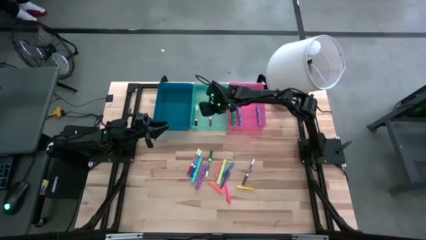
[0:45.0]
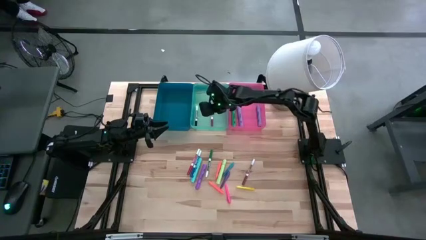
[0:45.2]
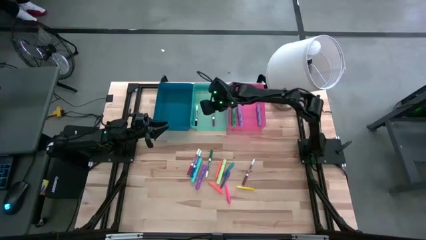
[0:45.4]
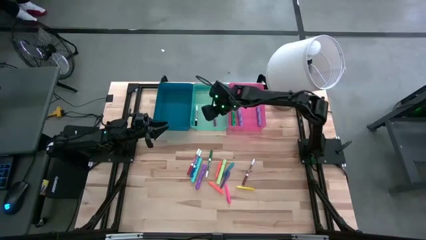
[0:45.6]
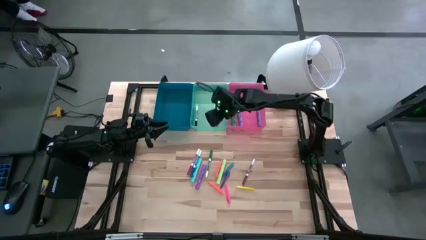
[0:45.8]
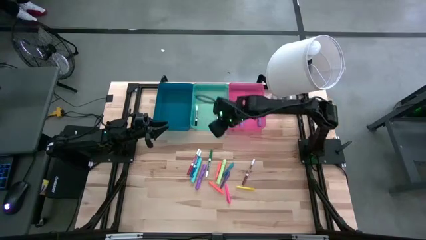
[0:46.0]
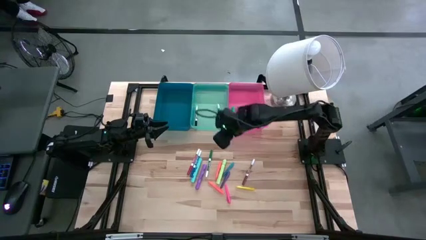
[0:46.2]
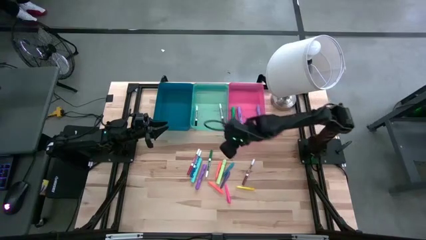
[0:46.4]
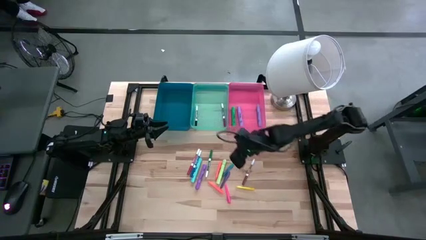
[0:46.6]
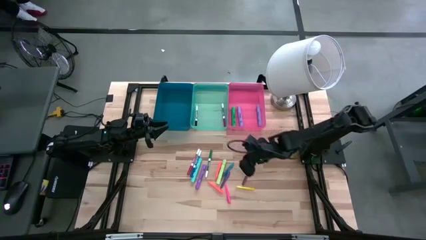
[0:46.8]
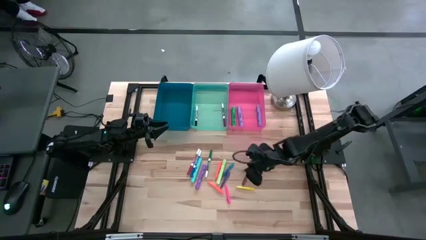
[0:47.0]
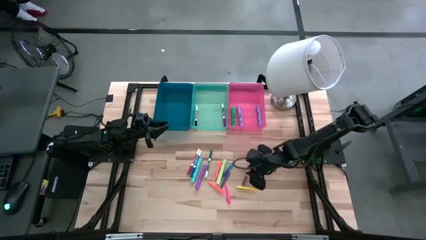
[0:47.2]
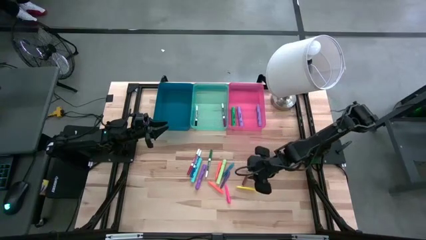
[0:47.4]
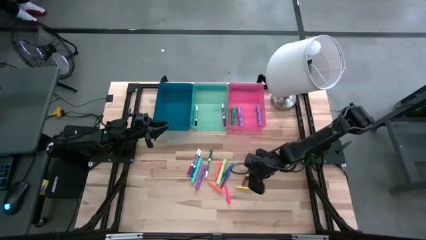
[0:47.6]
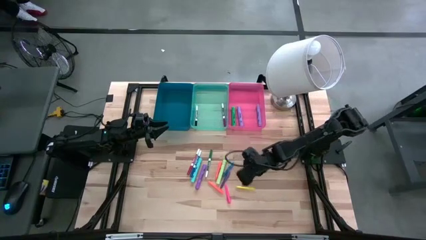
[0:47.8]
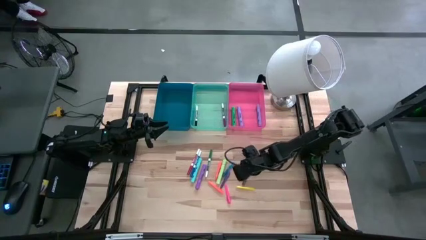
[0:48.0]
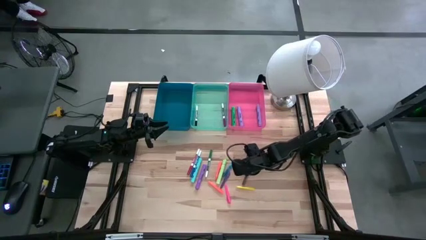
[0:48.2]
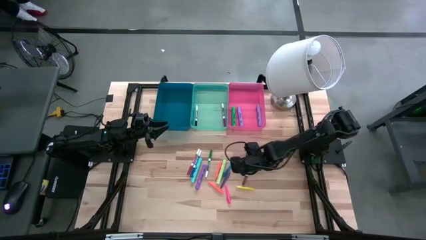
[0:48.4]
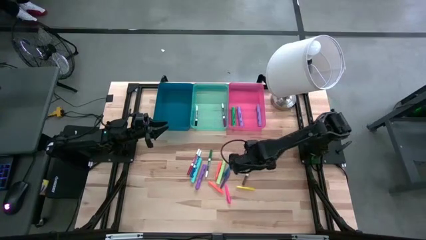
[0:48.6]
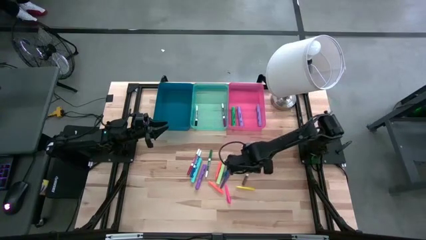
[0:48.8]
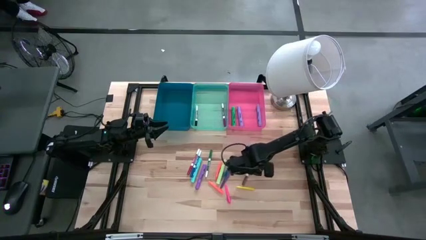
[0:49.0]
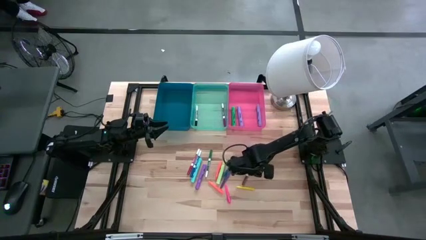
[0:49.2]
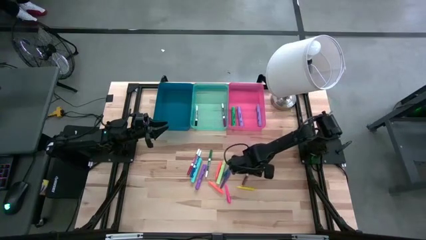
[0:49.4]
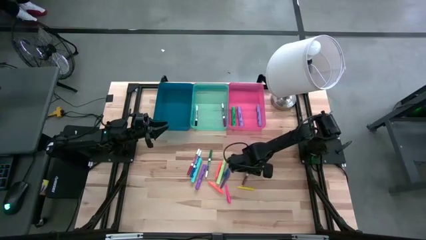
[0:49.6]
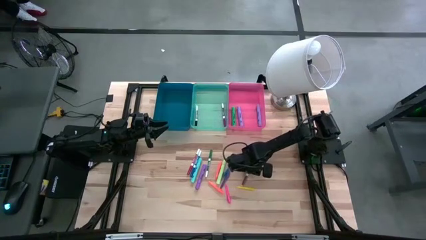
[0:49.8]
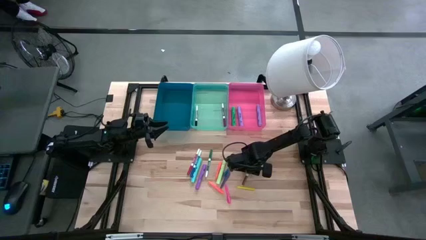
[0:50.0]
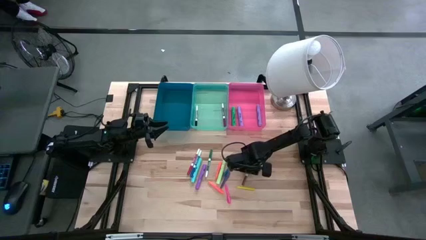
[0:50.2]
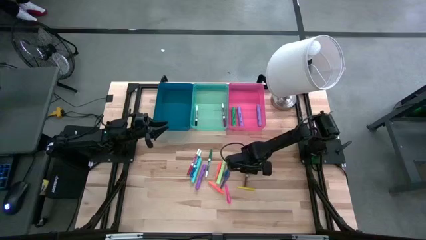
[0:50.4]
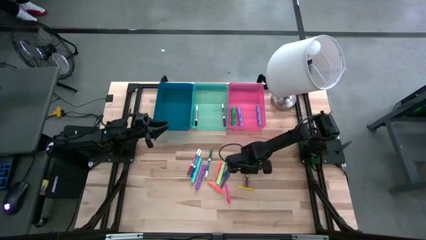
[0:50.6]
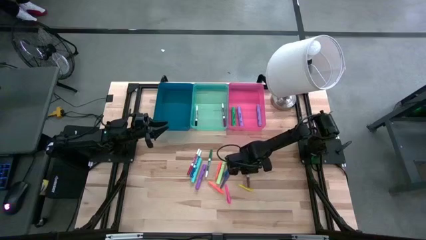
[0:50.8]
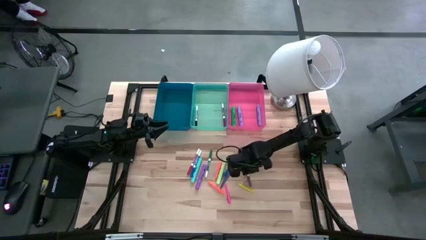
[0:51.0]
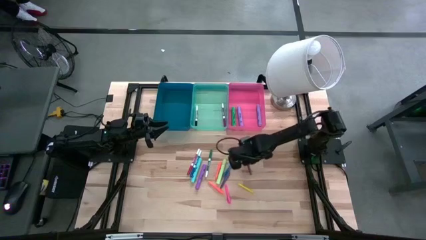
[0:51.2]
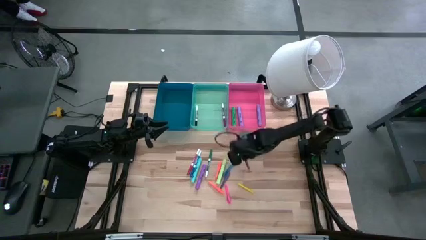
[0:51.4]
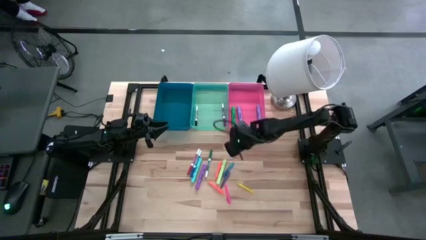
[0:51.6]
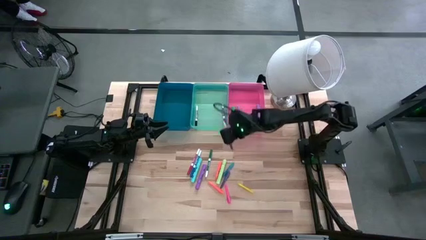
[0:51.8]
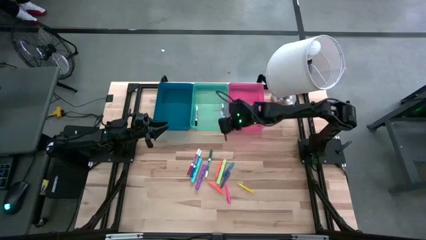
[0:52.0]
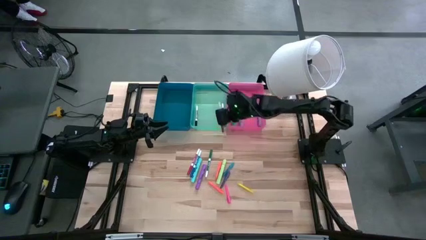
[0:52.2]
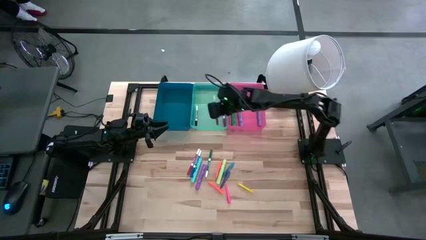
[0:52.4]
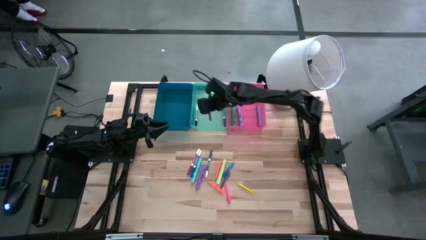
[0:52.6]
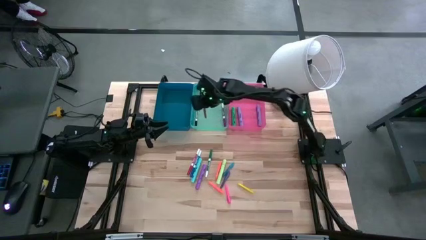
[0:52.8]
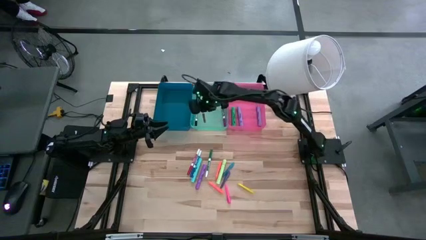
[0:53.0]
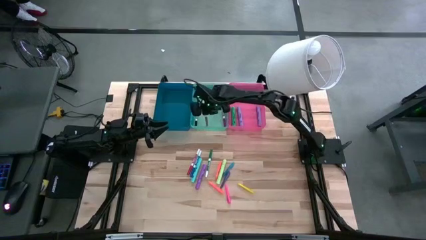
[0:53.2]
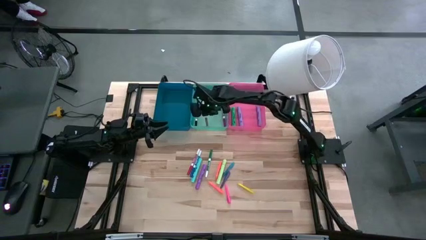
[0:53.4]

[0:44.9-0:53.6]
Task: Pick & Place Markers
Put the brown marker pen into the green bin

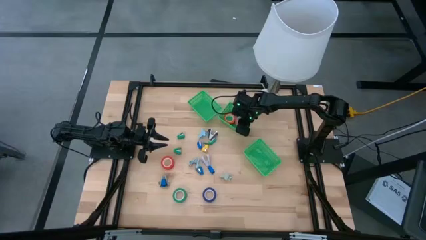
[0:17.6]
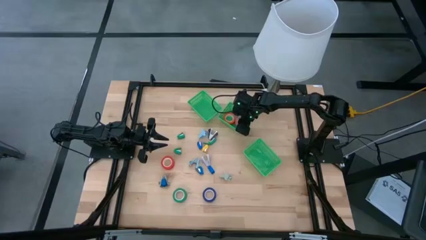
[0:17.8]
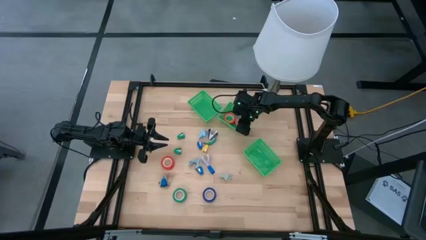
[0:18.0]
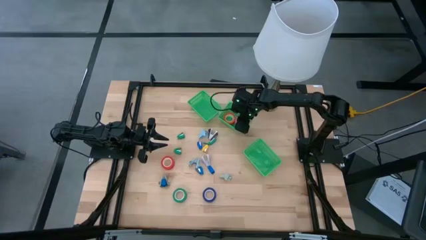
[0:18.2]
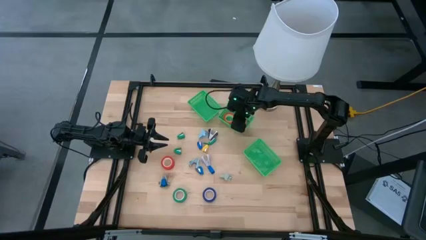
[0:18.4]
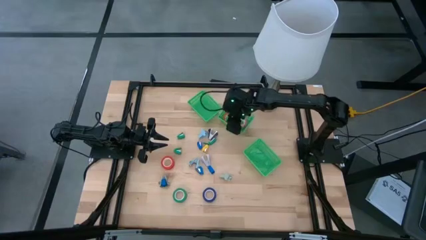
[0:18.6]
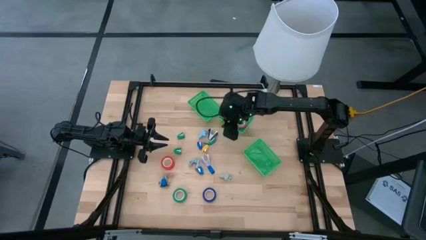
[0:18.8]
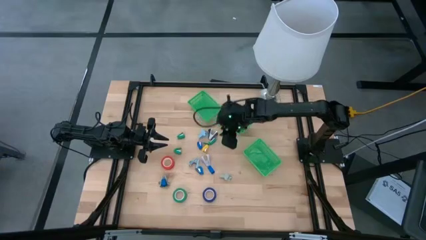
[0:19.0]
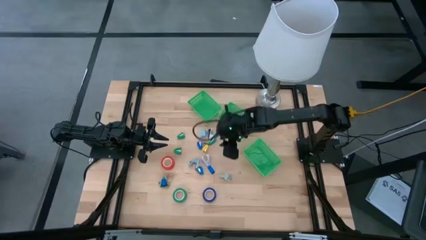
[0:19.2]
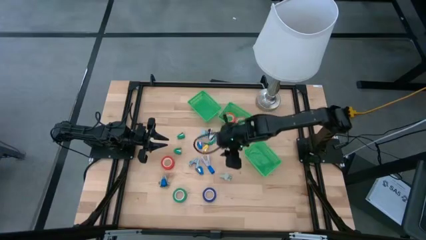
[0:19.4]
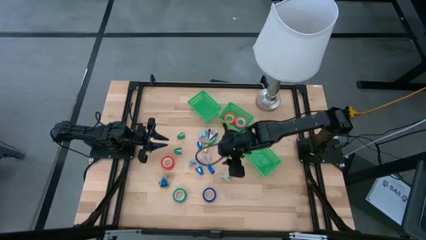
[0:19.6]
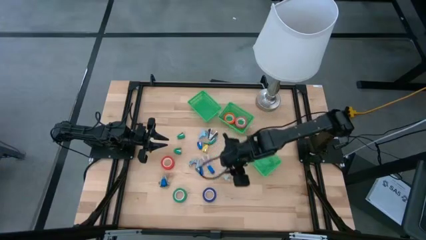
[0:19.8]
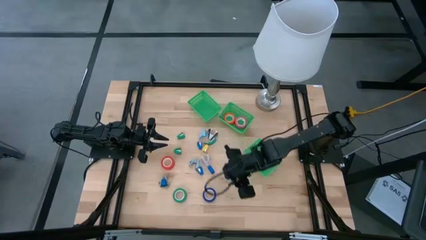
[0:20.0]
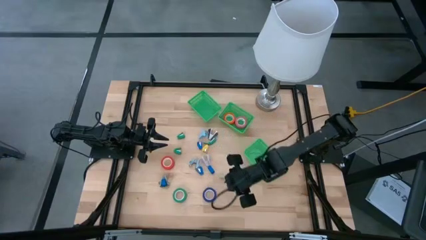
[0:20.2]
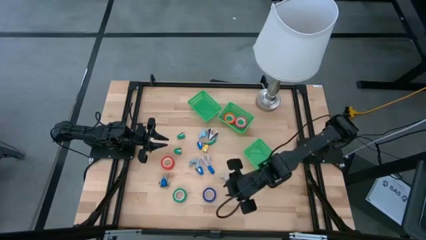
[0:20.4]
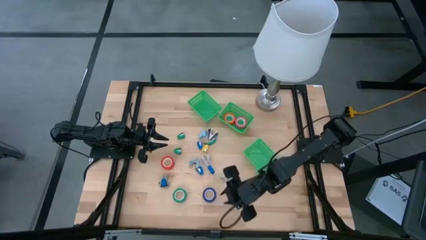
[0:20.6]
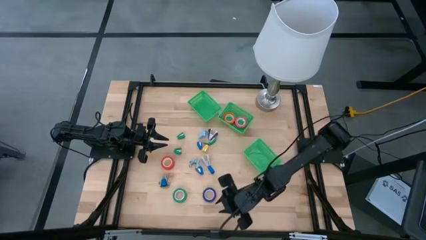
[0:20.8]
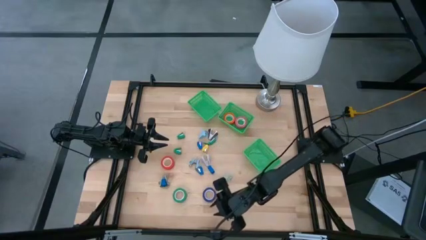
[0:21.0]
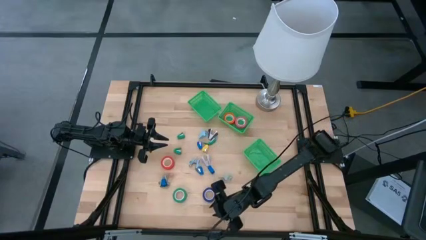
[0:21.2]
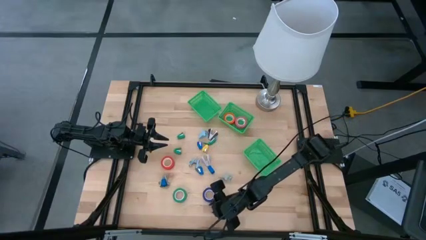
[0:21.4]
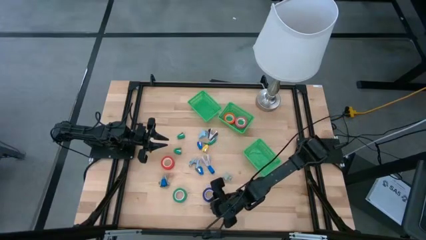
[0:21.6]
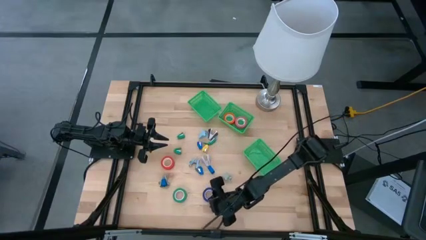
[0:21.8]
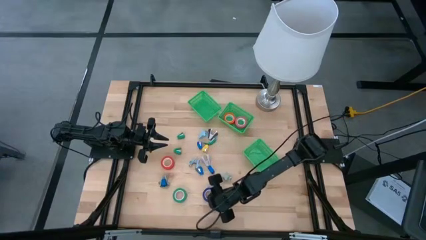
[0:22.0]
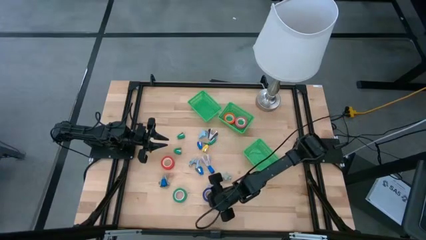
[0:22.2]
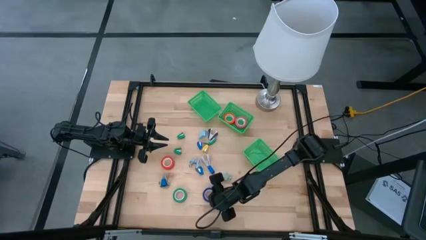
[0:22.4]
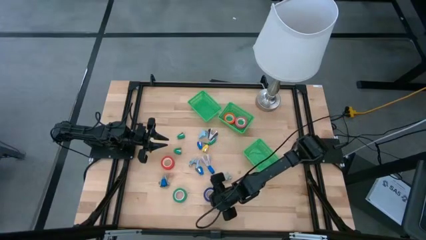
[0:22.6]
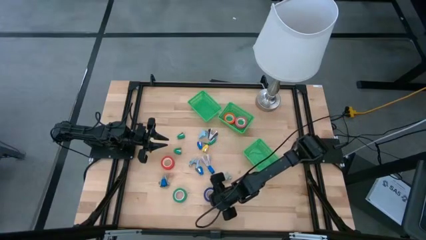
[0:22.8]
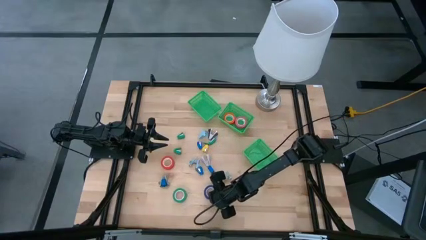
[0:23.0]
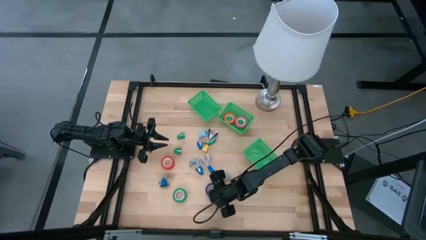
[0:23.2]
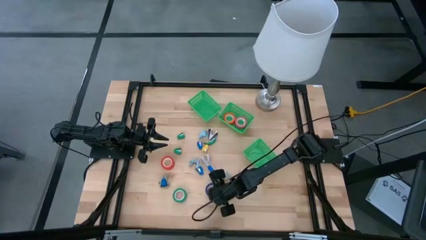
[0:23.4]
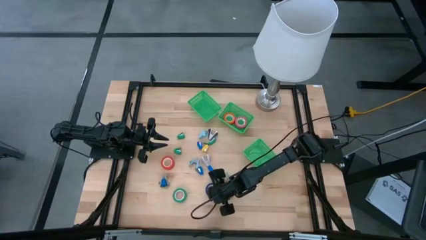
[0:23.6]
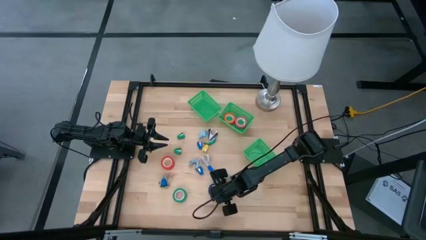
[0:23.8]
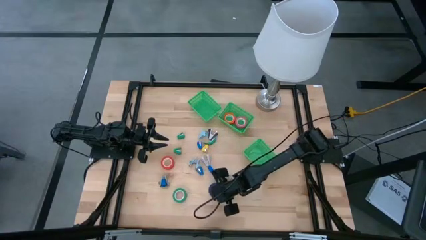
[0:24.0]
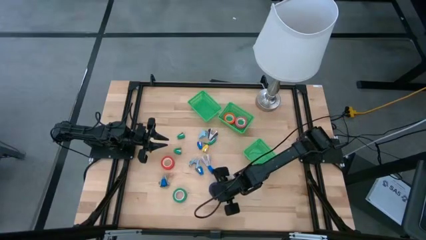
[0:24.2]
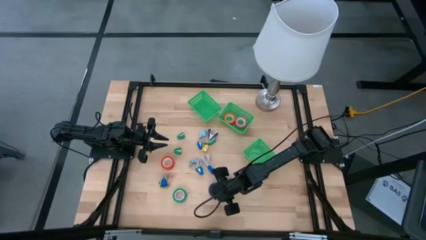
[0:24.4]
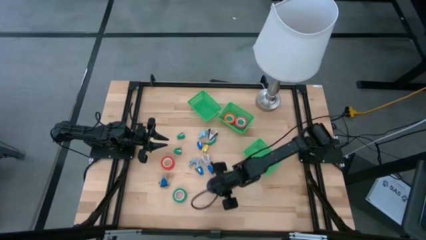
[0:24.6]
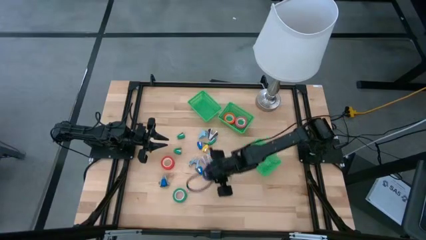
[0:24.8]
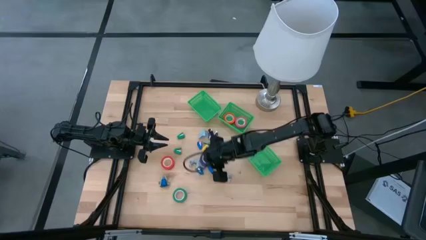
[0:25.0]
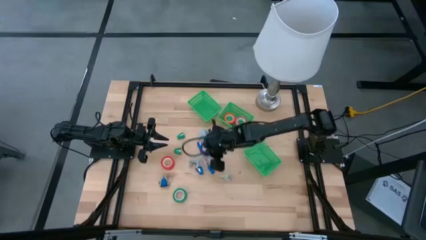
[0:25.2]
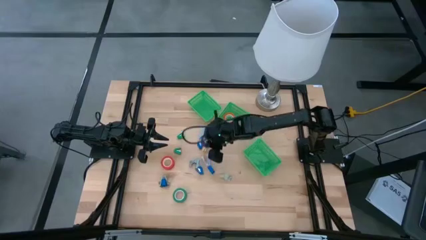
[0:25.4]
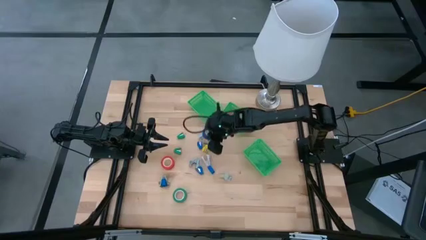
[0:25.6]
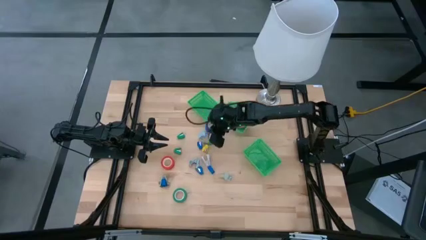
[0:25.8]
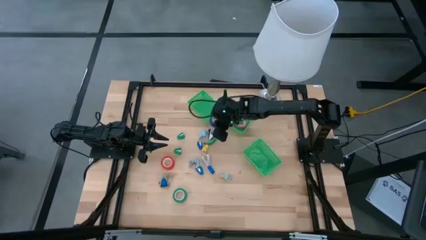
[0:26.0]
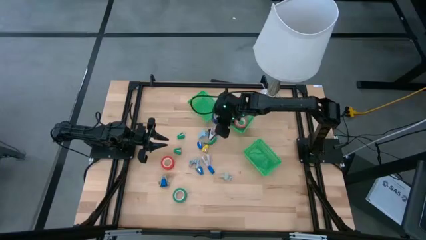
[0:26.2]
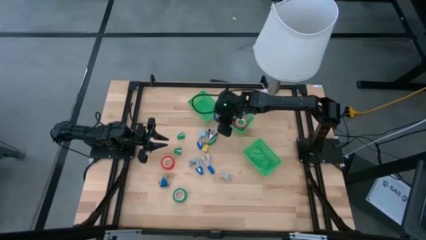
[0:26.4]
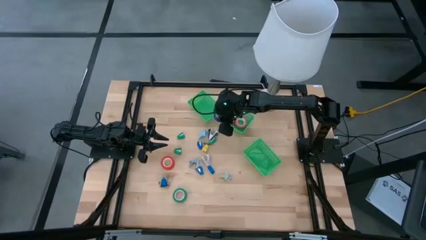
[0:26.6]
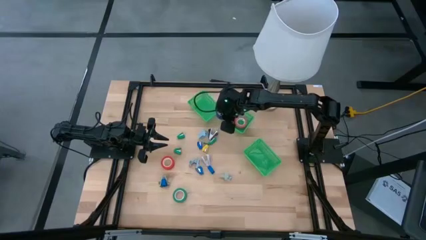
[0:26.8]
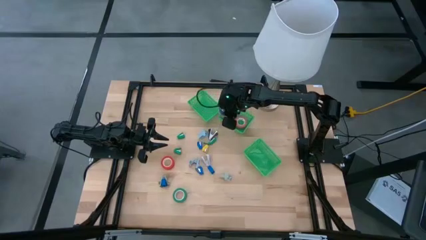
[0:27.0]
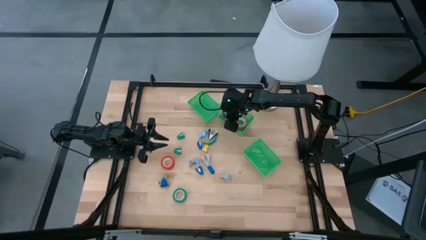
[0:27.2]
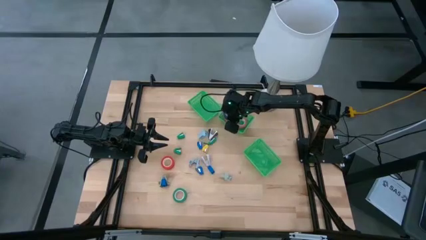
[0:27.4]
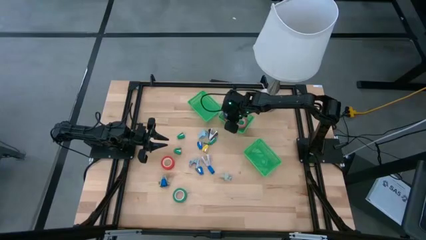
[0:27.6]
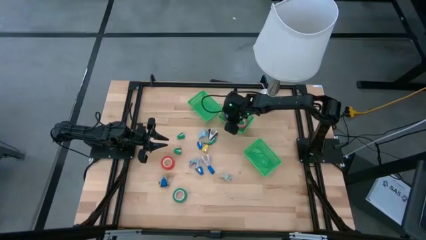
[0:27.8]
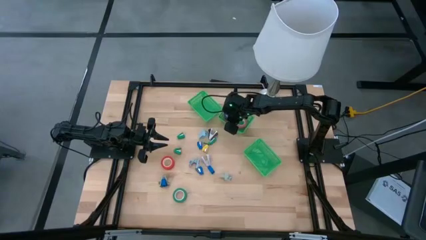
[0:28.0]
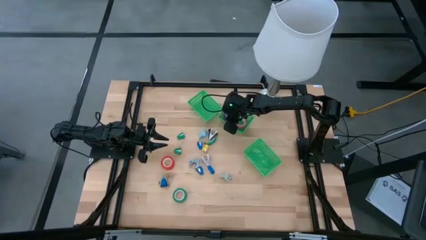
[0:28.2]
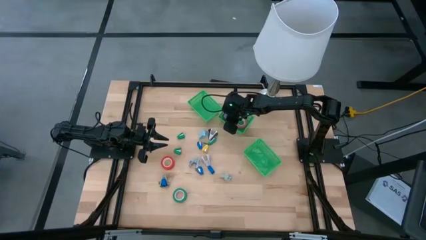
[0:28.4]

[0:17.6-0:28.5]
Task: Pick and place Stapler, Stapler remover, tape
Put the blue tape into the middle basket
